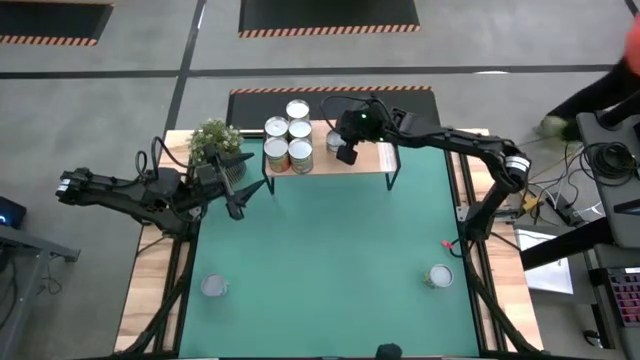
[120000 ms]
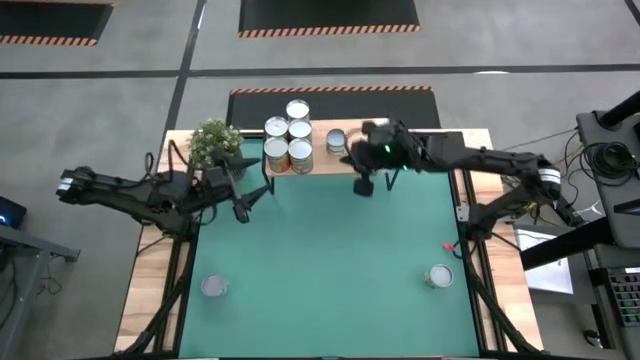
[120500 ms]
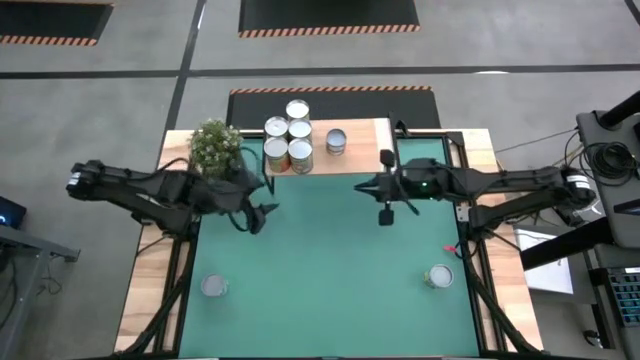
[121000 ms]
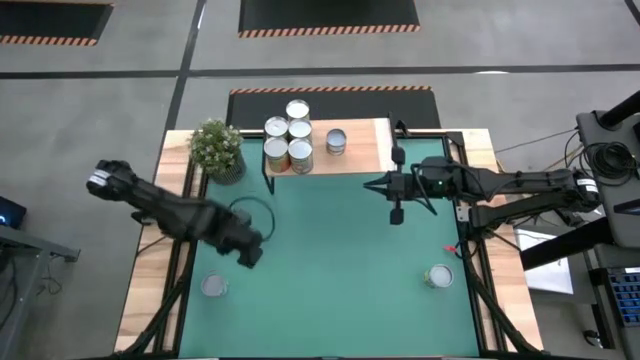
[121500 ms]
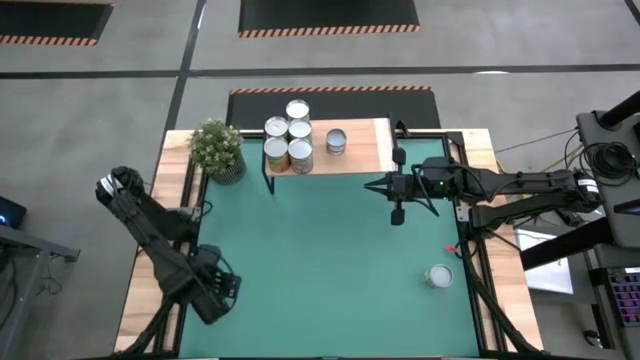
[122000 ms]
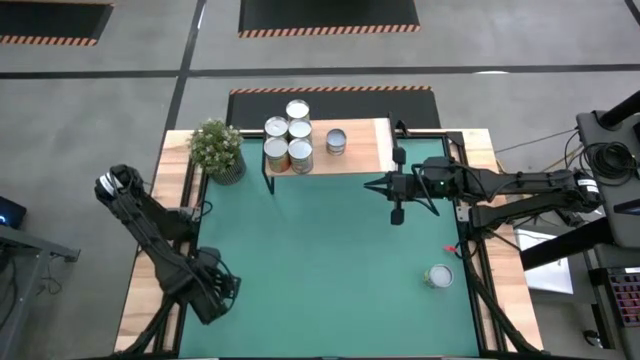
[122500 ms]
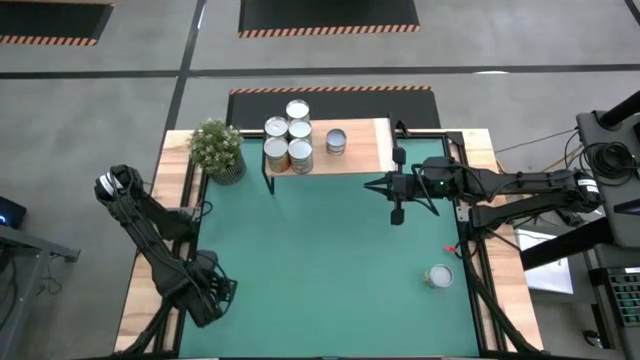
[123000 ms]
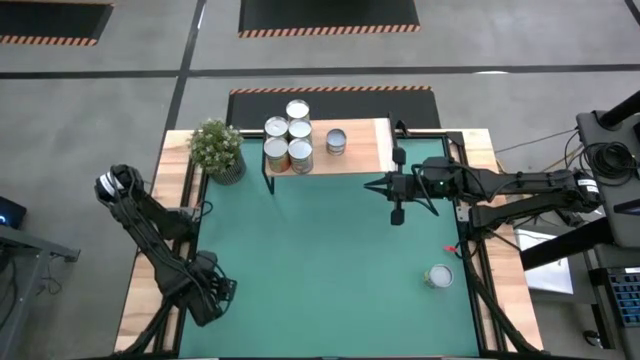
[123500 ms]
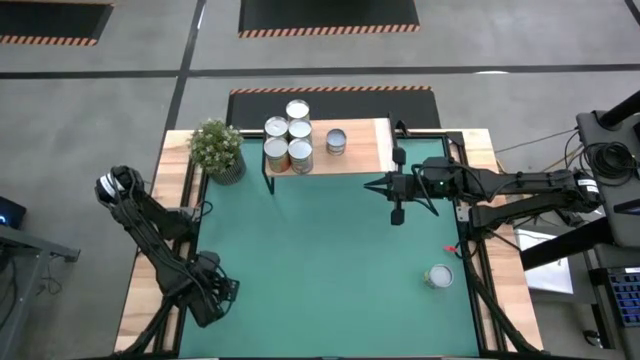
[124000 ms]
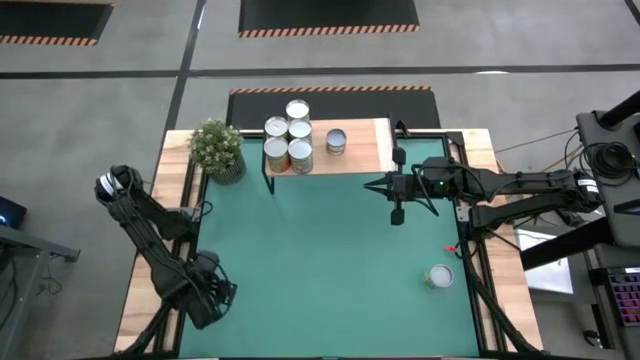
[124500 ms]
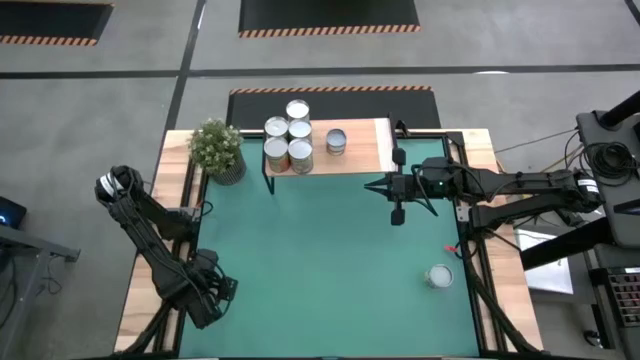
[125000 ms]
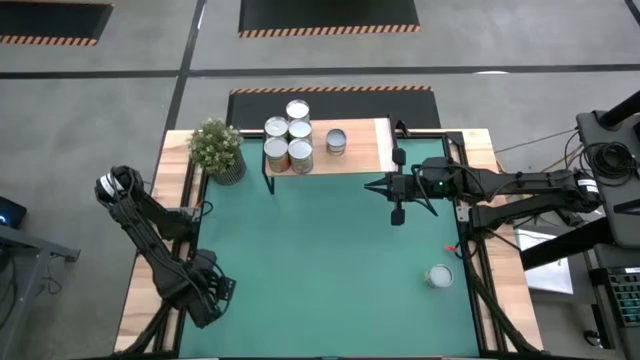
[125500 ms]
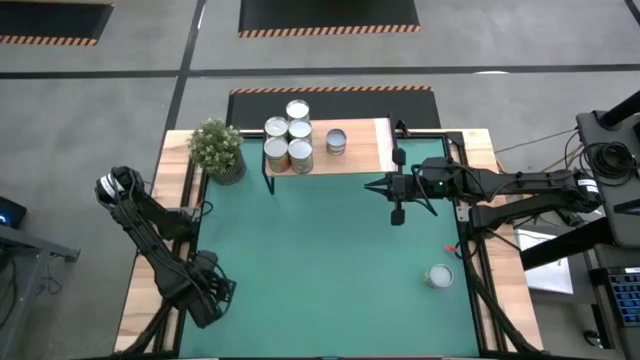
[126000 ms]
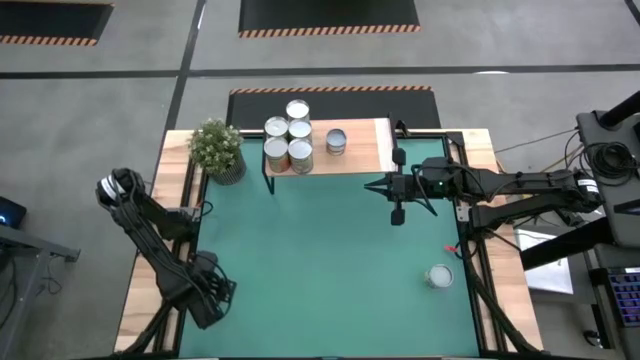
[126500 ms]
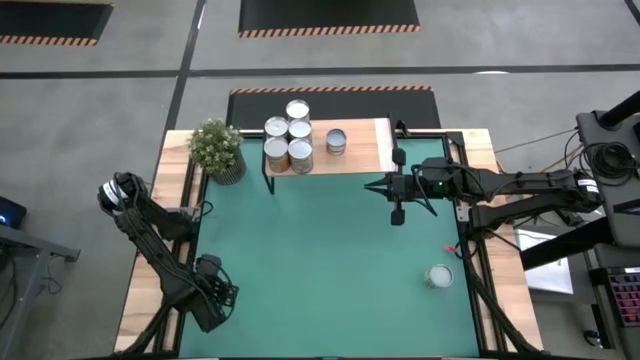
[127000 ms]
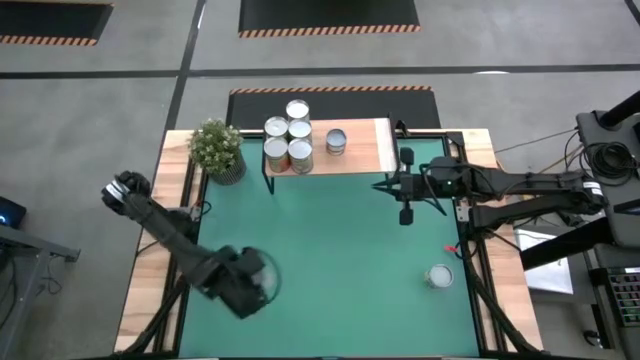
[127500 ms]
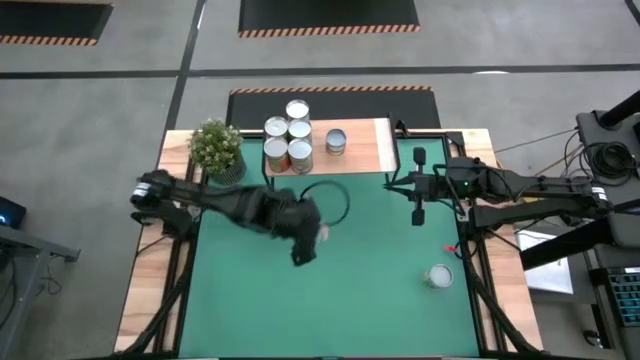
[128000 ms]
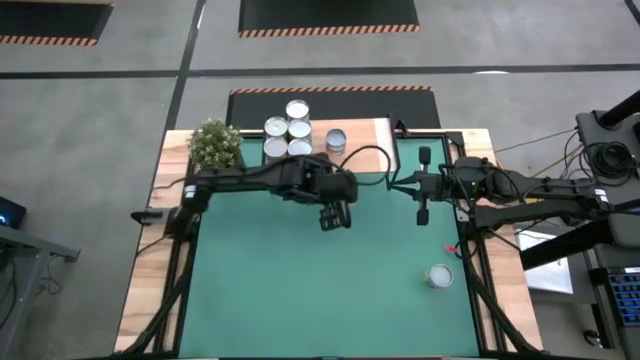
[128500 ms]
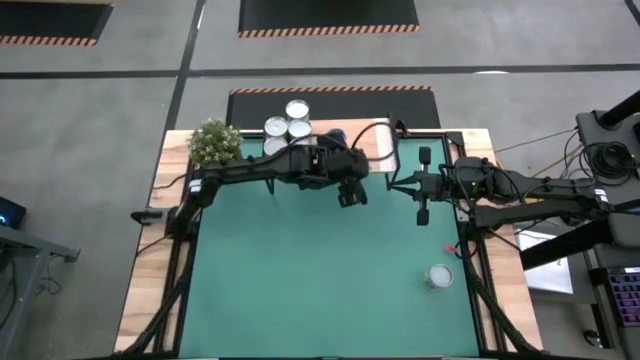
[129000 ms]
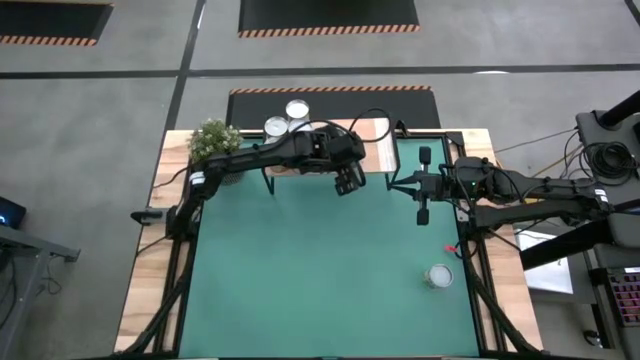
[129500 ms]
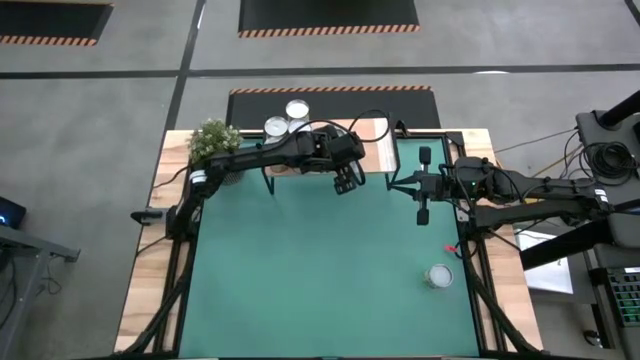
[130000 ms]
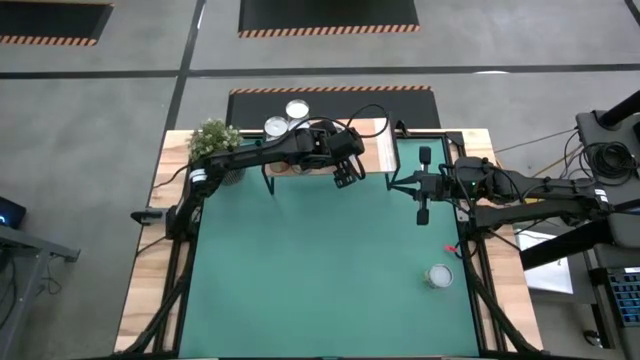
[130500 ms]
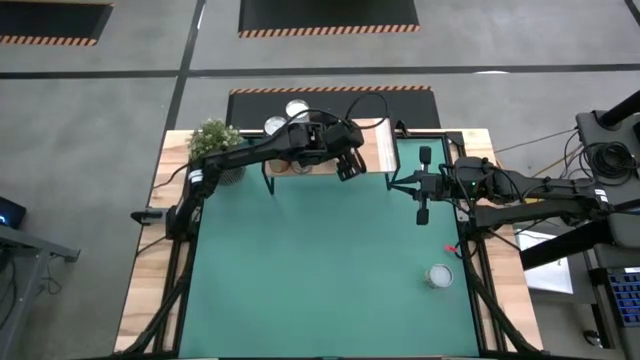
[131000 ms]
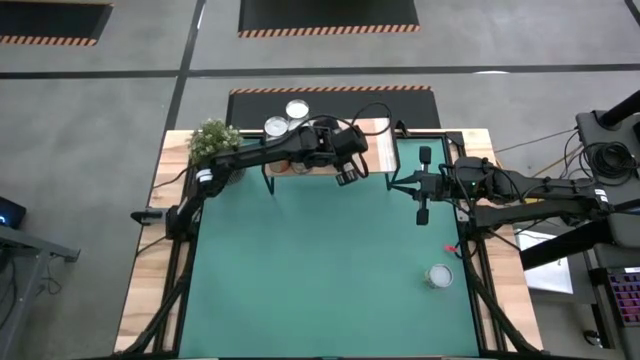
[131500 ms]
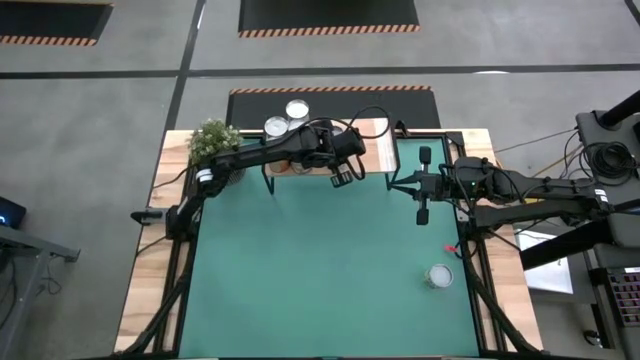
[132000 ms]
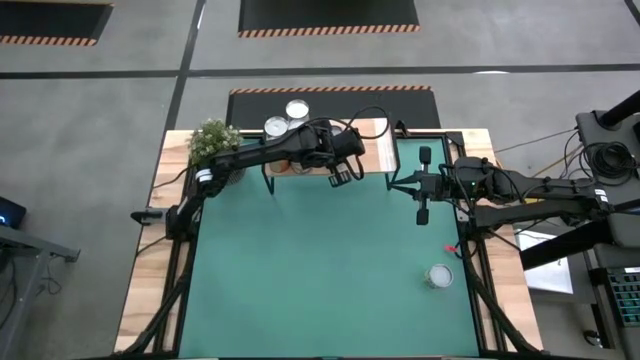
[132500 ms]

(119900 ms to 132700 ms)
Task: Pick and place cans onto a shelf
Put the small canned carrots on the shelf aligned with the other small canned oranges

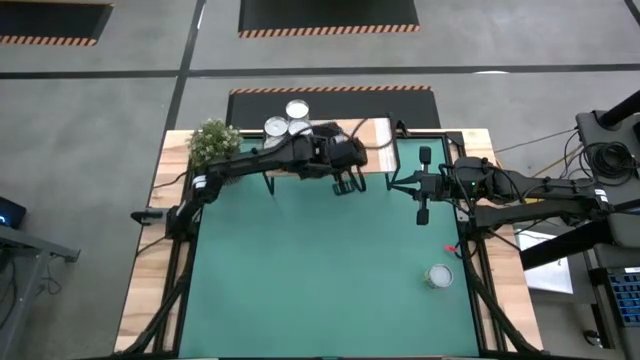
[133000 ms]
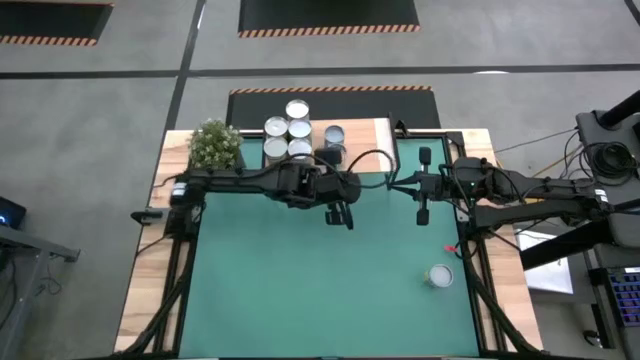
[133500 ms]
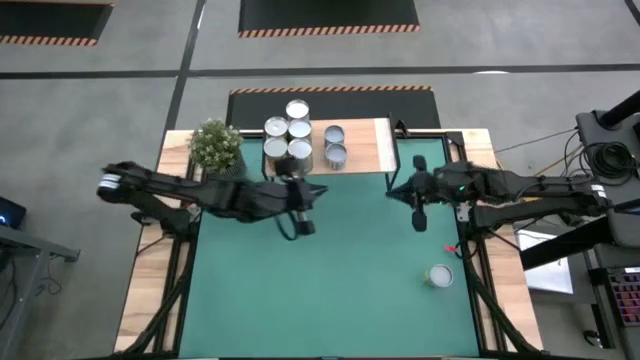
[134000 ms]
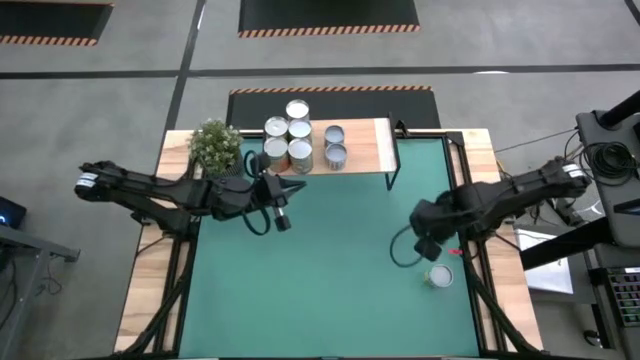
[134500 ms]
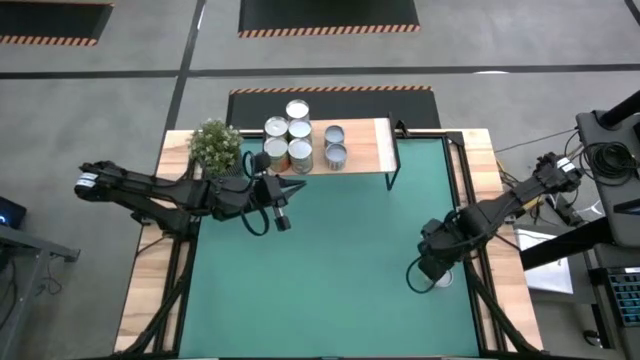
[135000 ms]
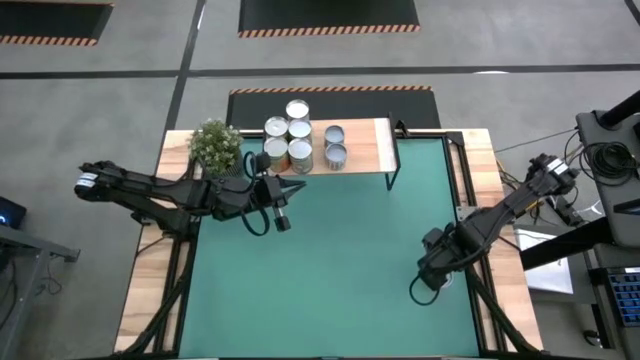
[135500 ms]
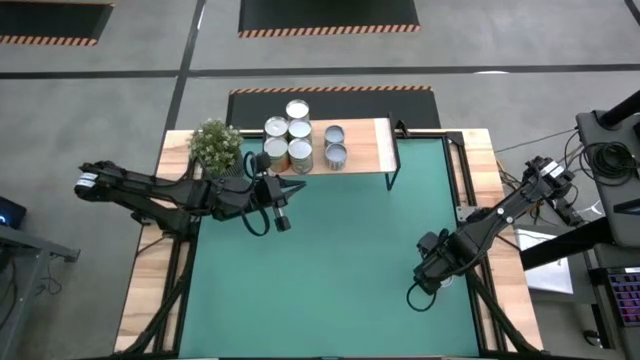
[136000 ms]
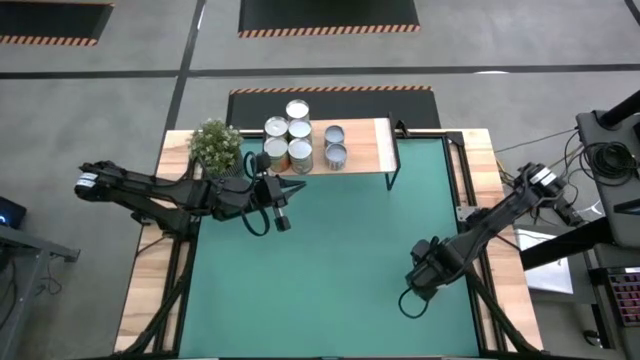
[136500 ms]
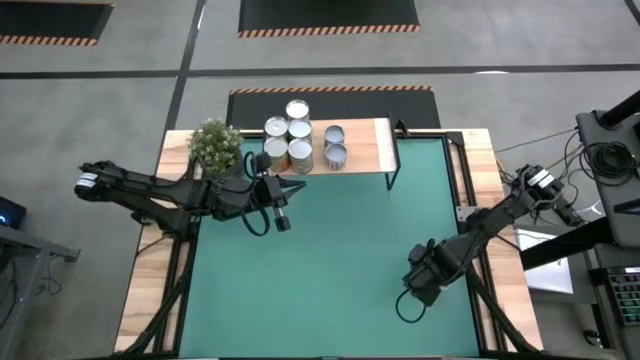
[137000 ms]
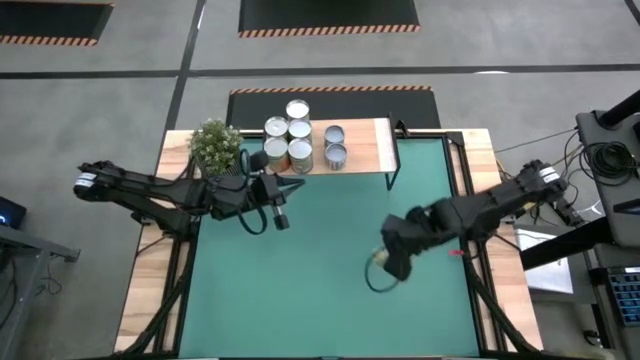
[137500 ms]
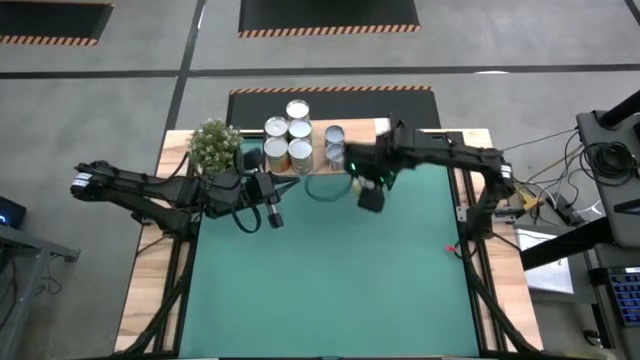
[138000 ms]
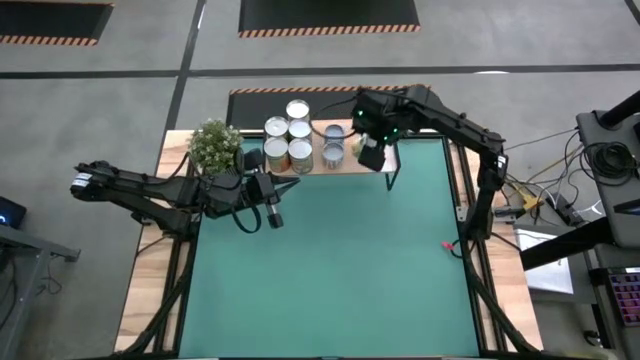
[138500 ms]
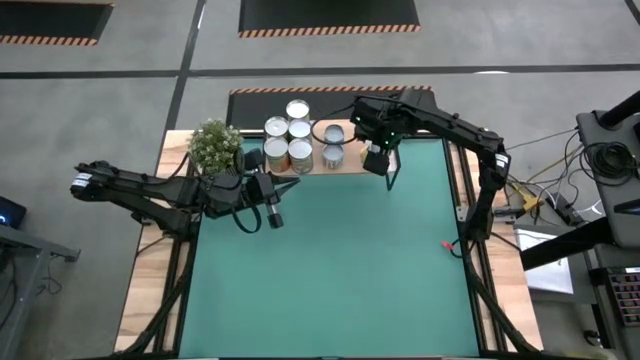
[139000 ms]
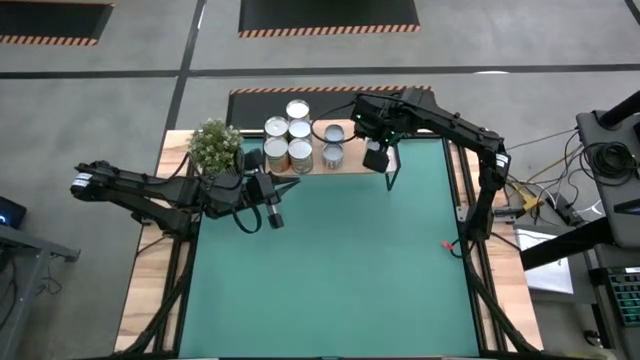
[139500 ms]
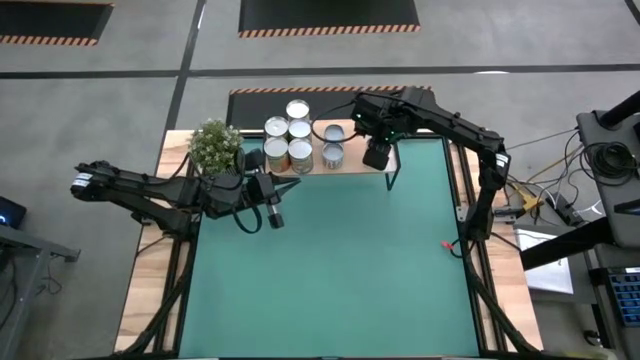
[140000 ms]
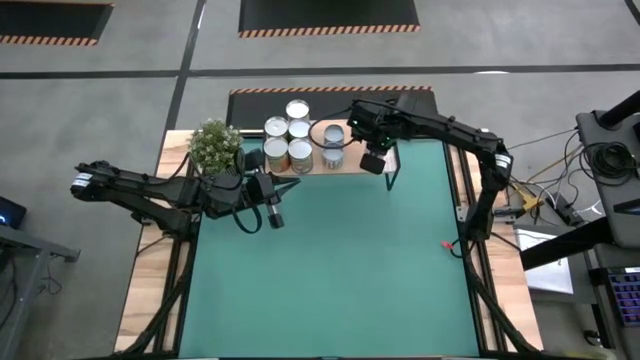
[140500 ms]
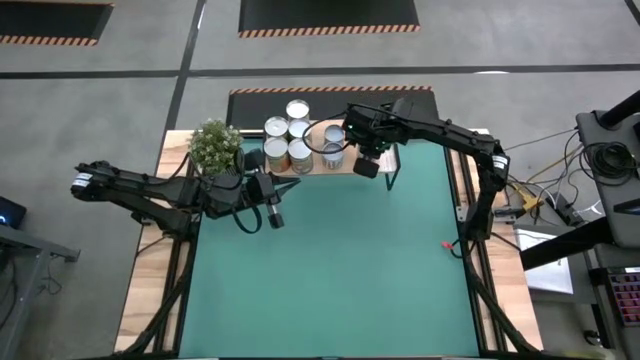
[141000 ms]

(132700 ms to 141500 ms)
Put the big canned mixed fruit on the shelf

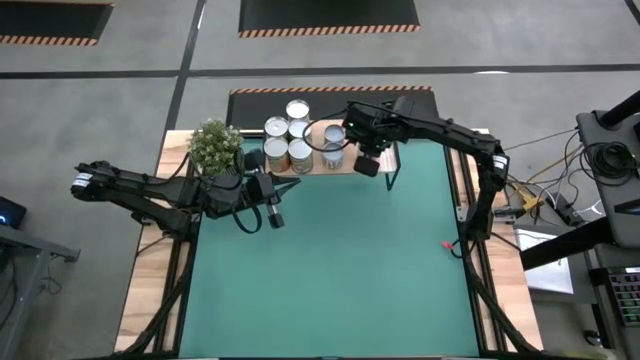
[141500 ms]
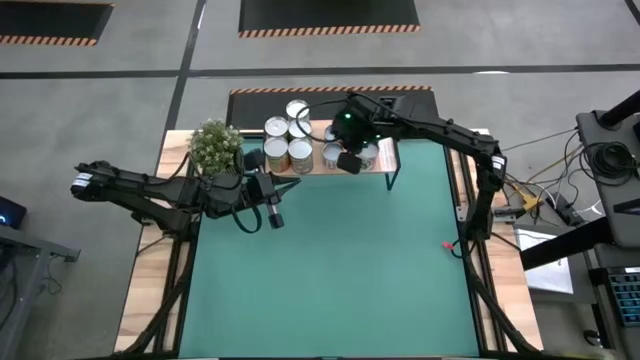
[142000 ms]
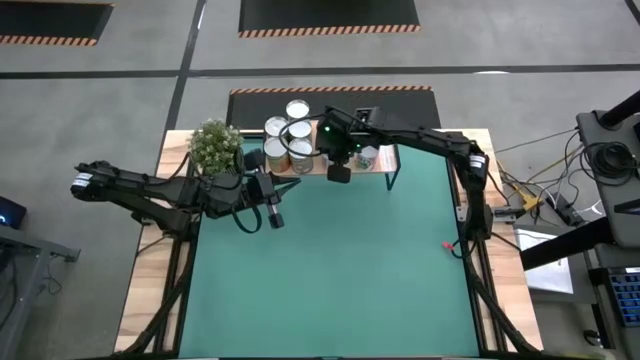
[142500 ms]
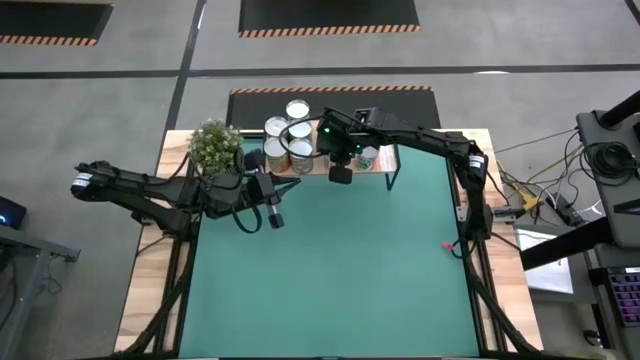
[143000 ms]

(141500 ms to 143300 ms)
Adjust the small canned carrots on the shelf
